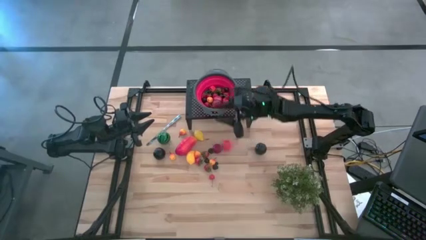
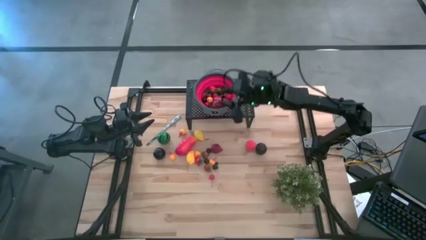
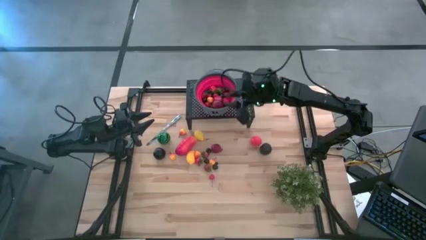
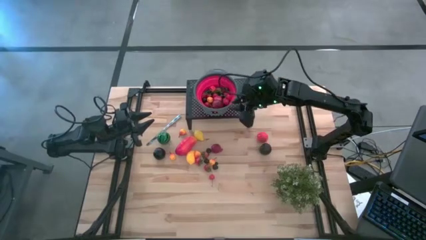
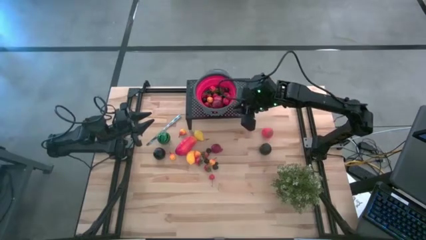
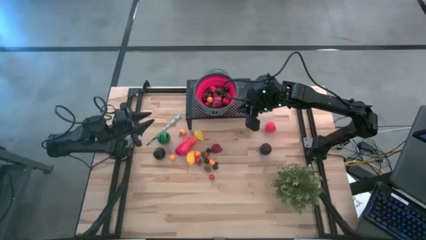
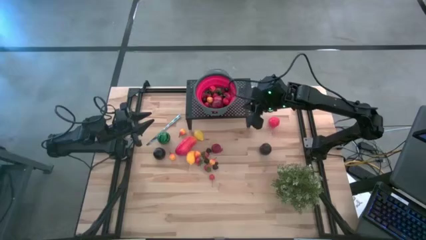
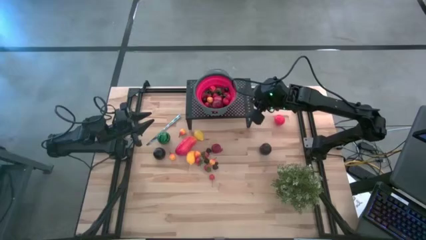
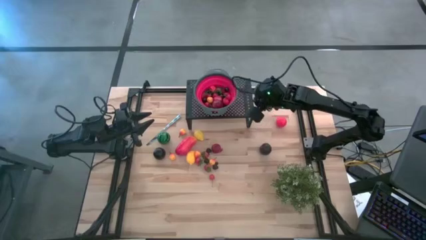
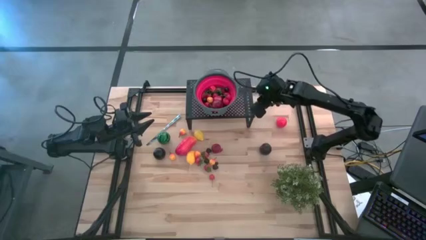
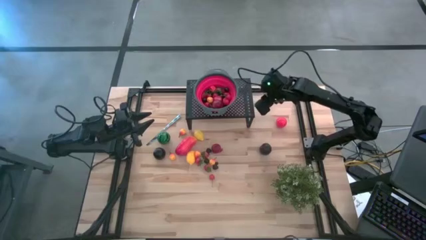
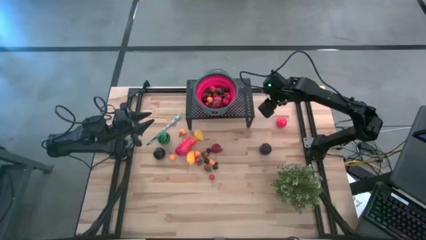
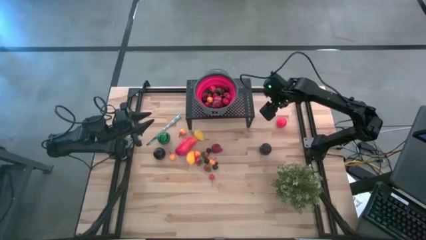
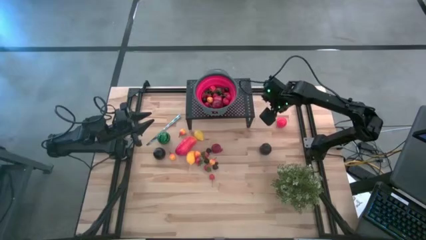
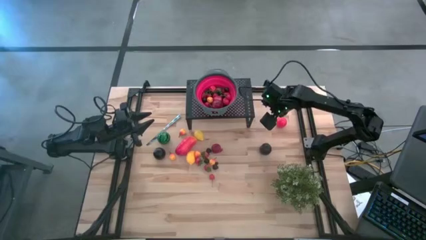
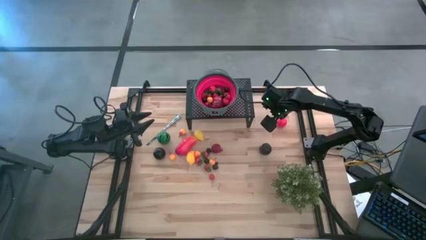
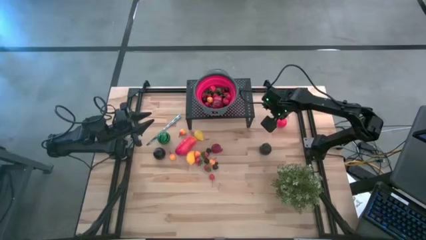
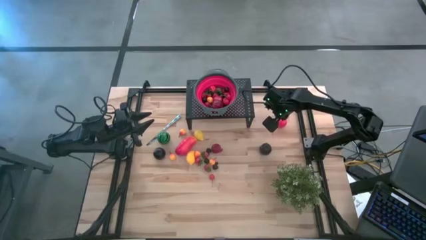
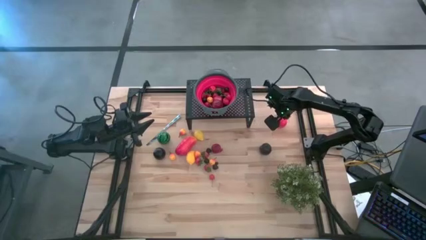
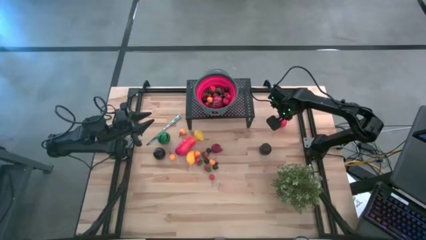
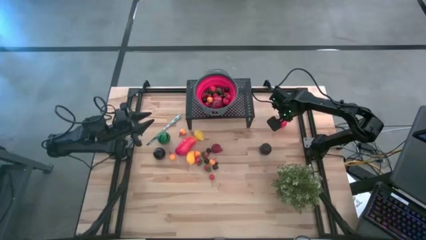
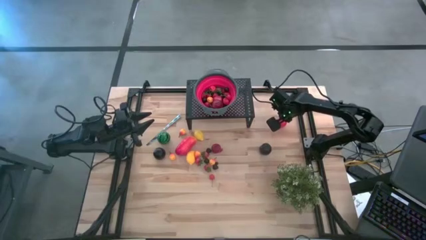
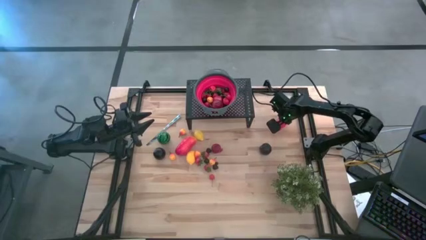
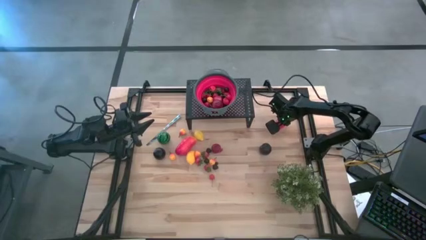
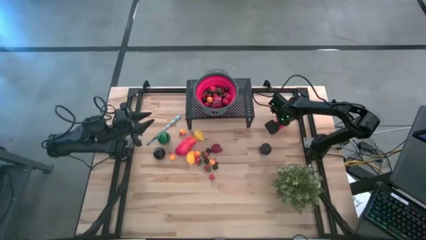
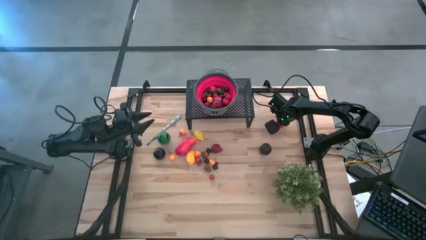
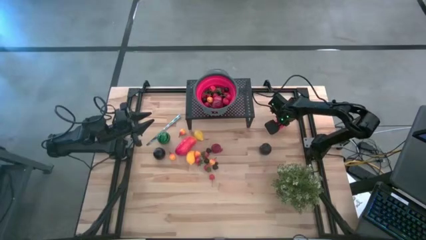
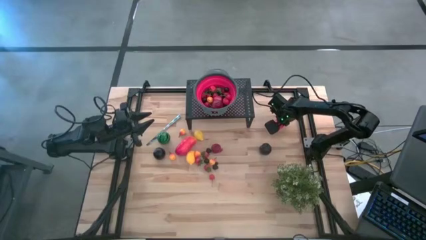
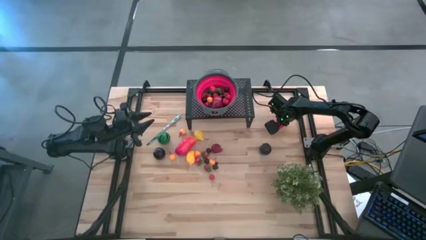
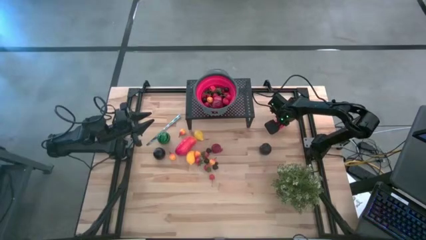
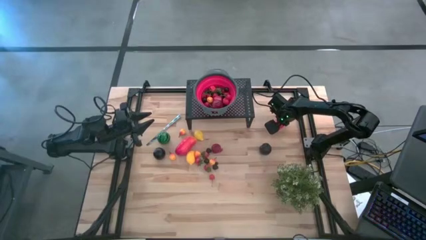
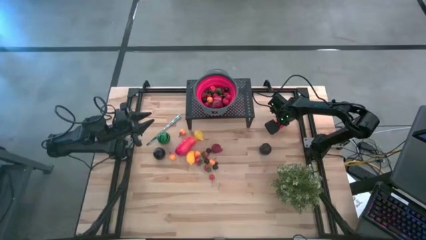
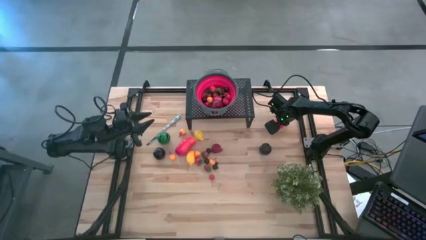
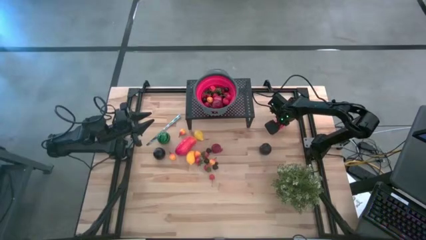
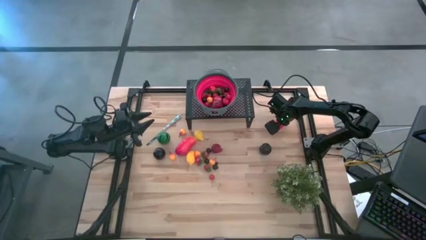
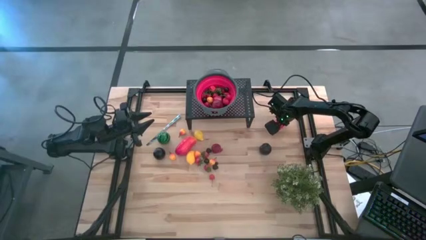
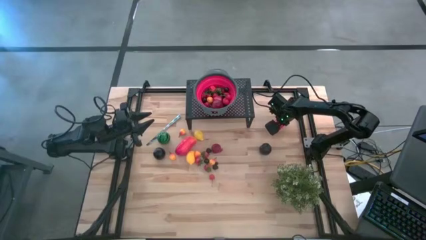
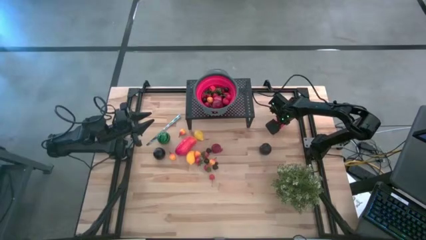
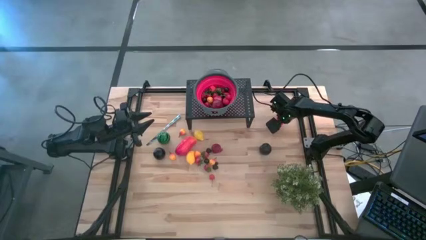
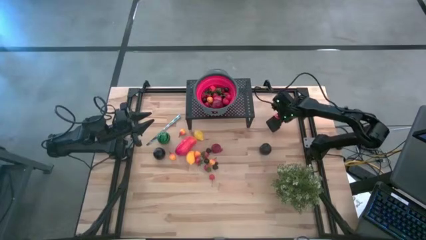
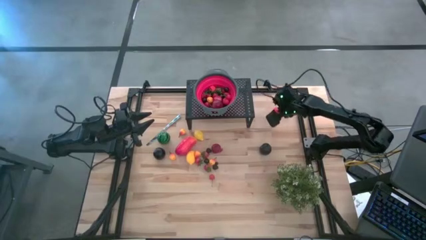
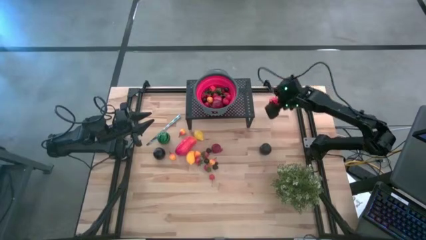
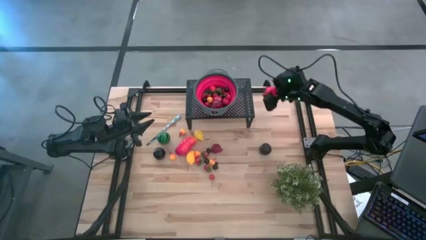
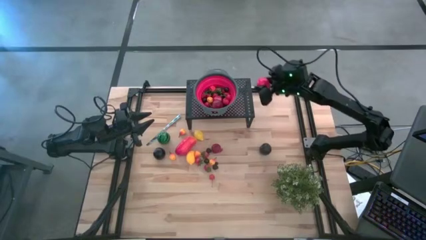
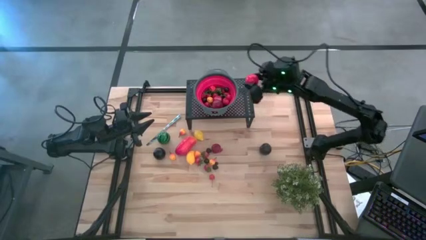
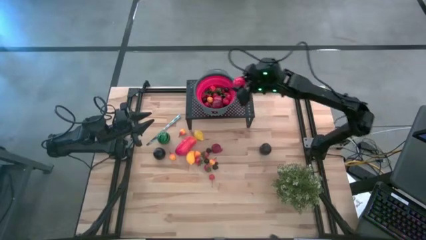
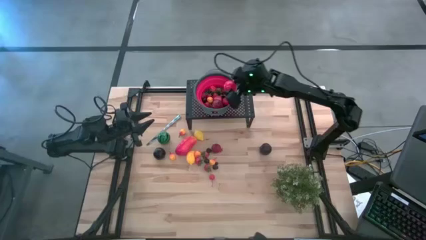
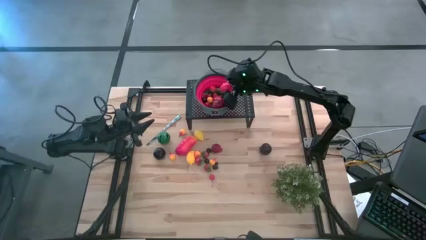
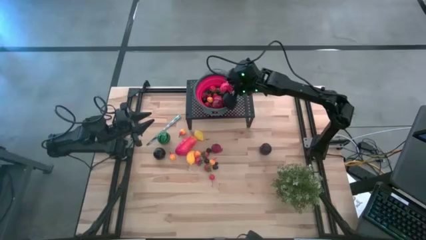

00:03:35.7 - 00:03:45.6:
Task: Pick & Place Fruit
Put the tomato in the red colander on the shelf

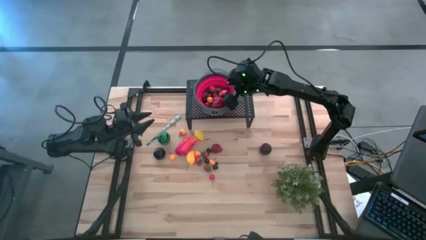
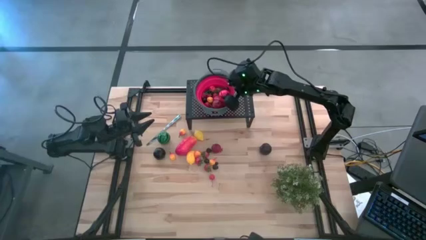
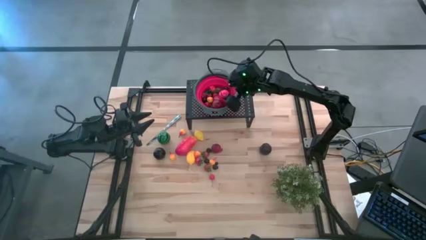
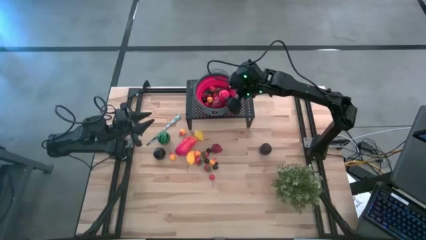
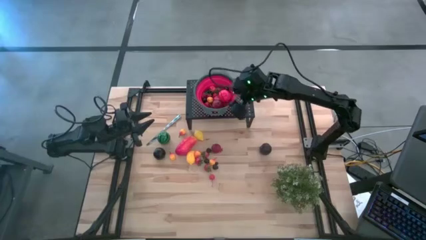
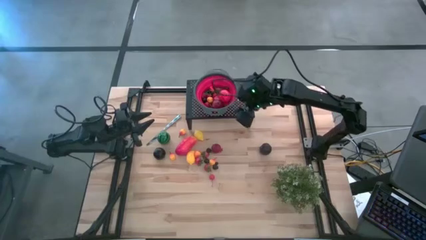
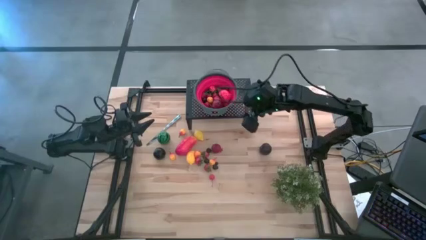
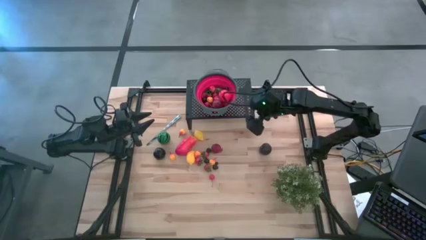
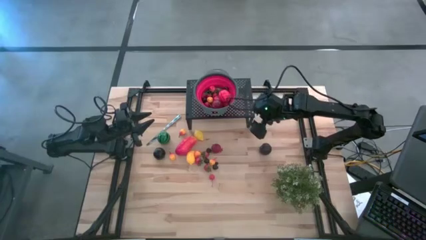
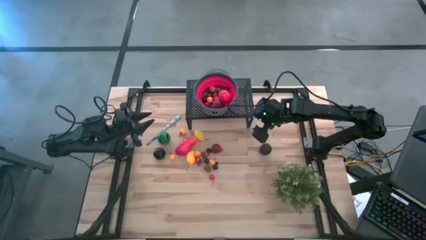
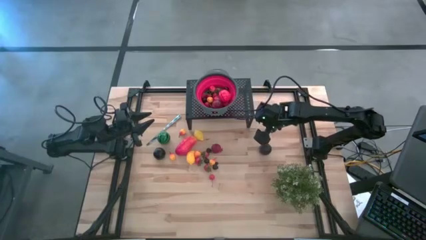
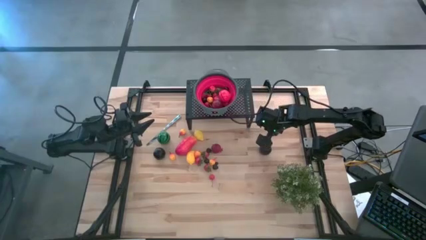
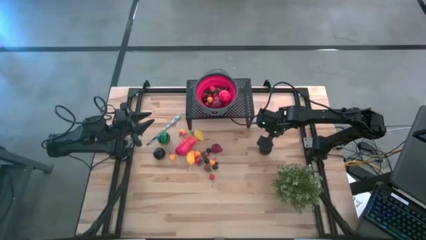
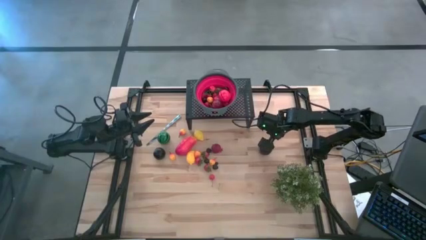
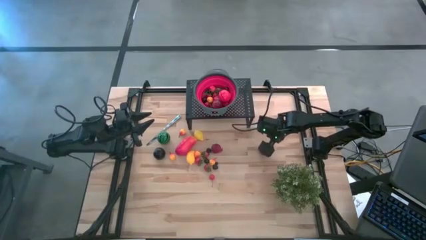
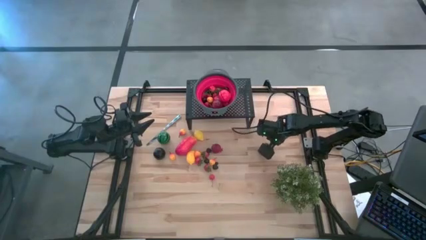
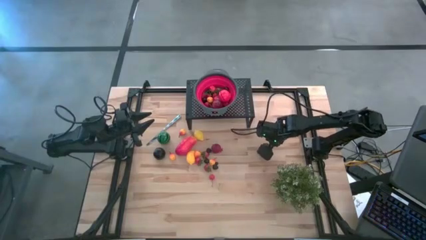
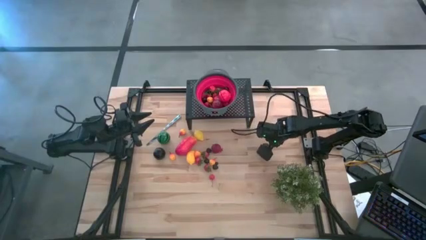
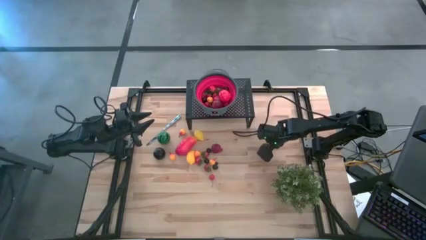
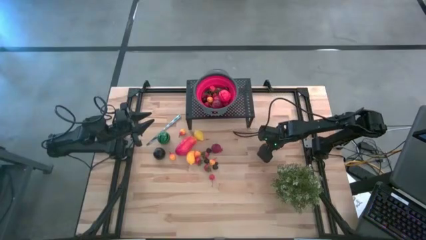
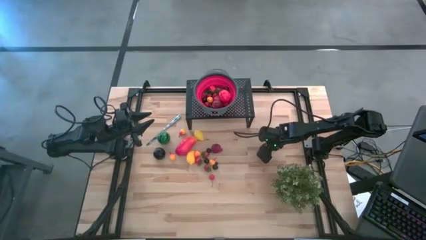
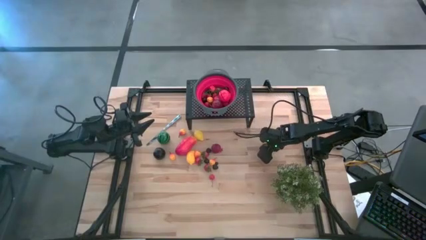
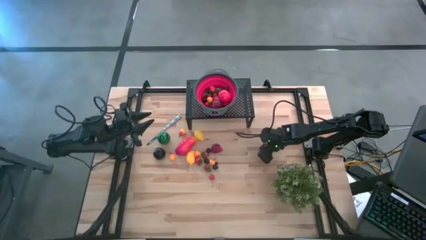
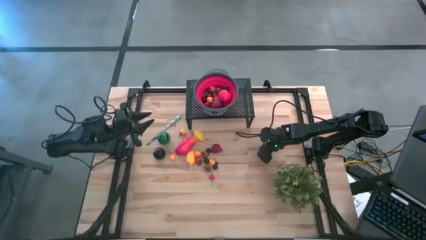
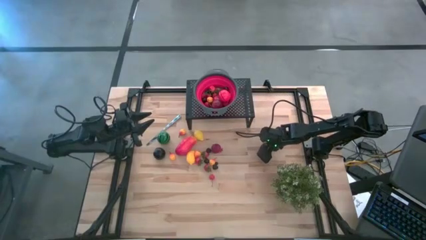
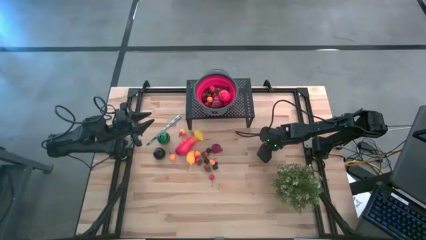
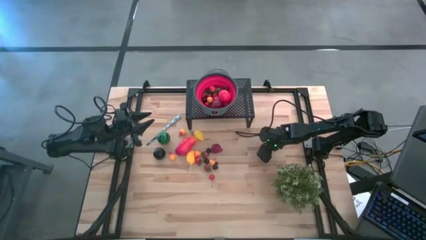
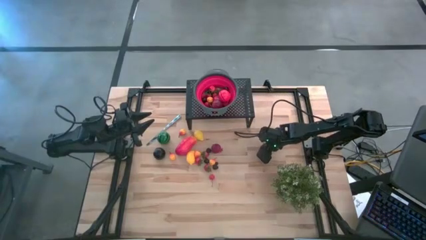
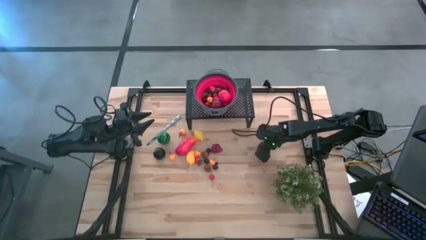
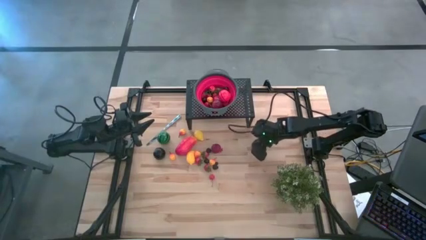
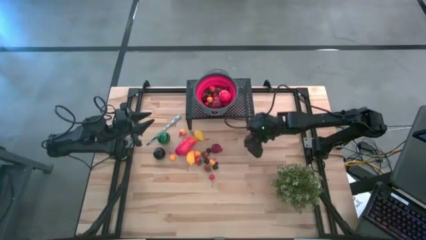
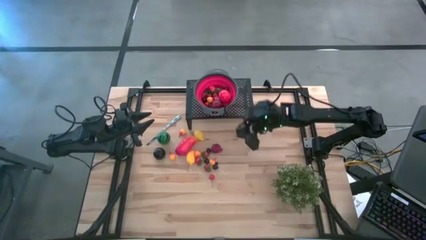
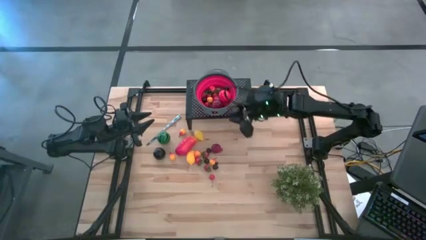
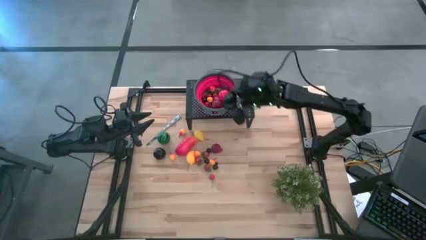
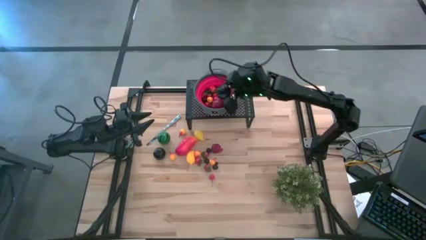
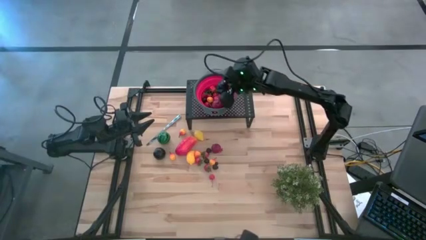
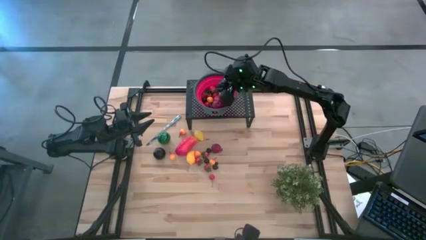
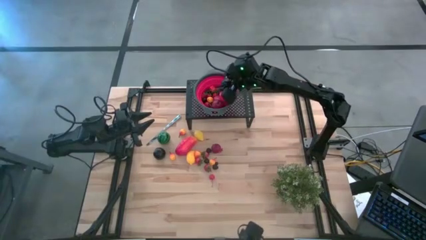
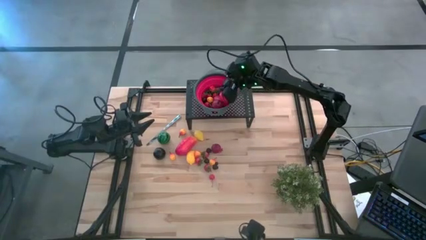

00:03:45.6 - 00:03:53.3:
Put the plum in the red colander on the shelf
